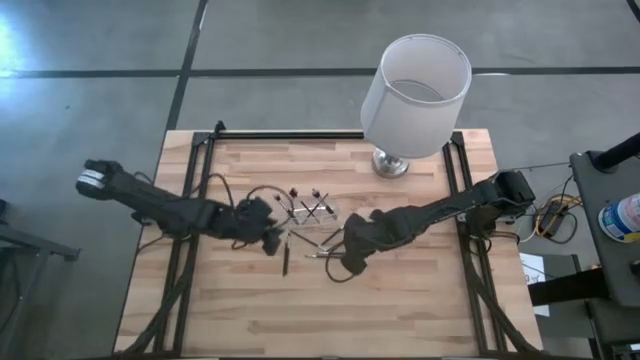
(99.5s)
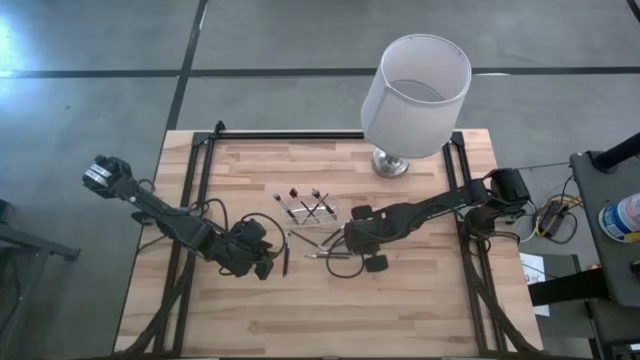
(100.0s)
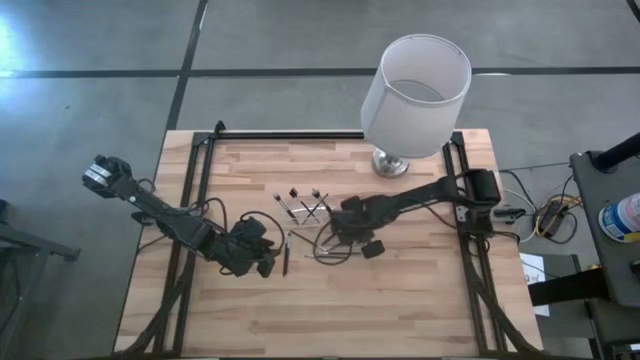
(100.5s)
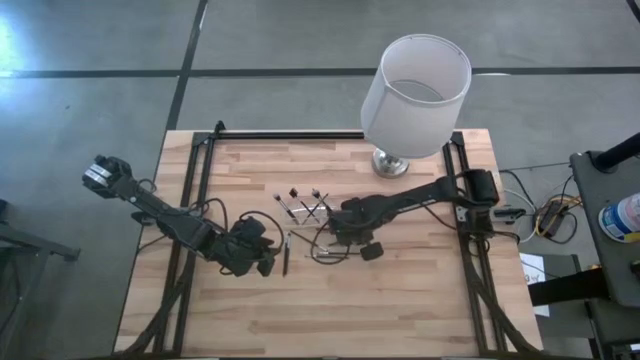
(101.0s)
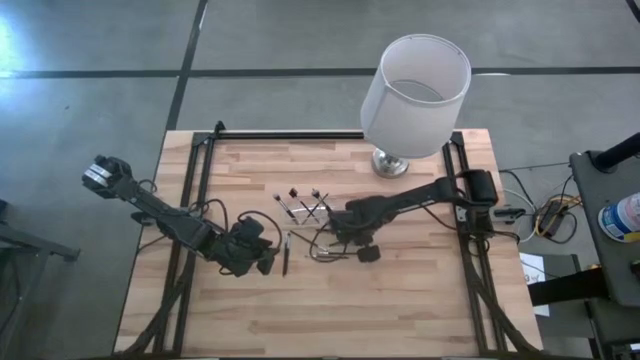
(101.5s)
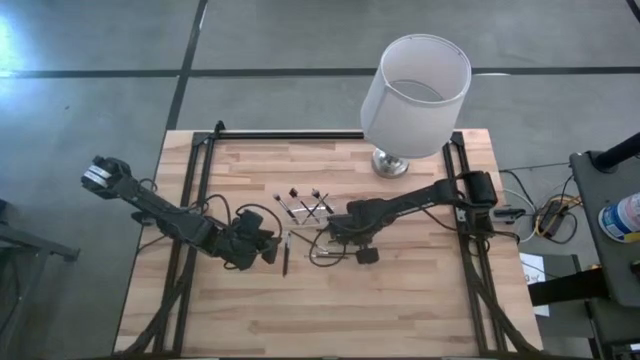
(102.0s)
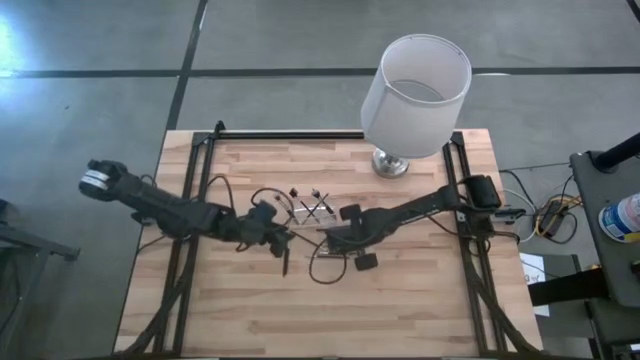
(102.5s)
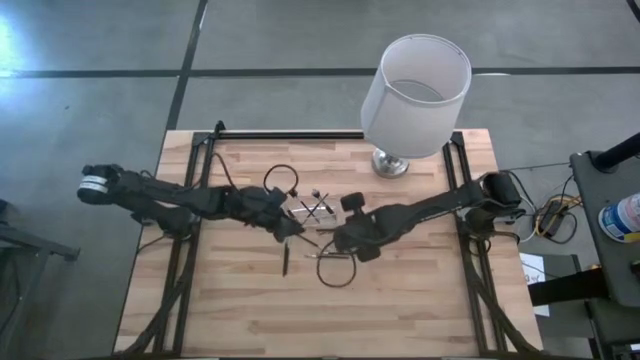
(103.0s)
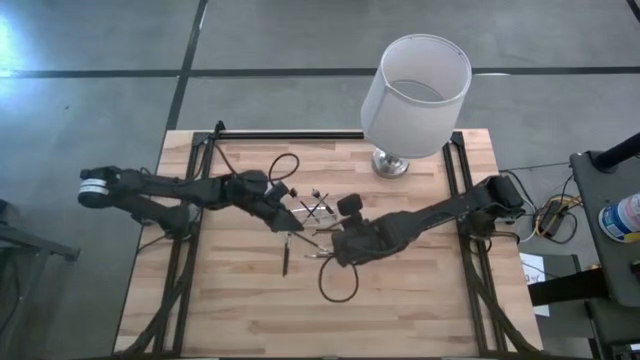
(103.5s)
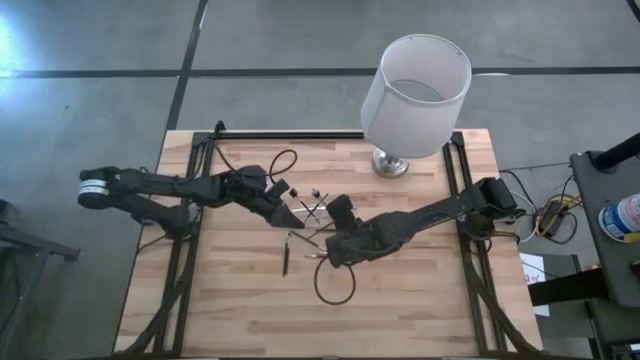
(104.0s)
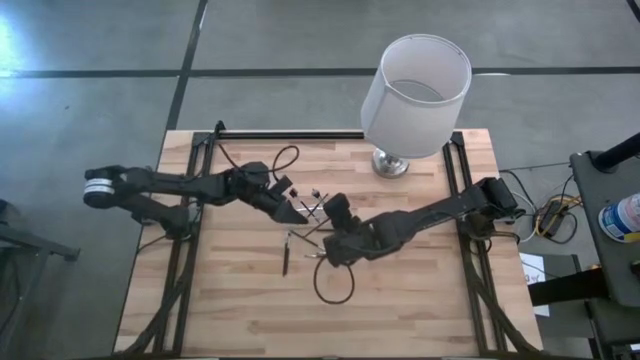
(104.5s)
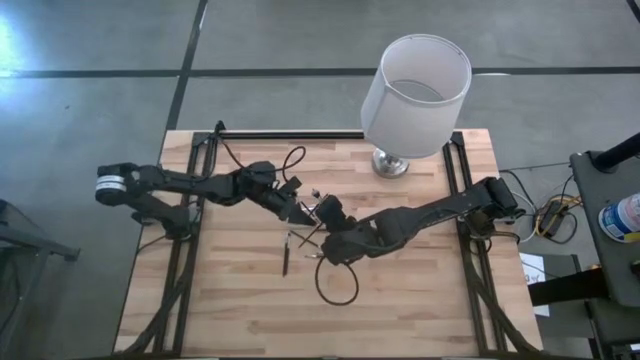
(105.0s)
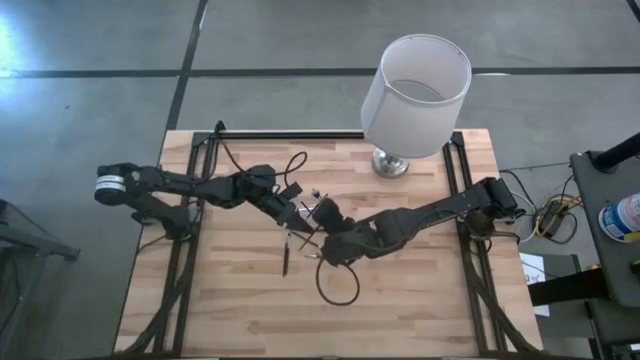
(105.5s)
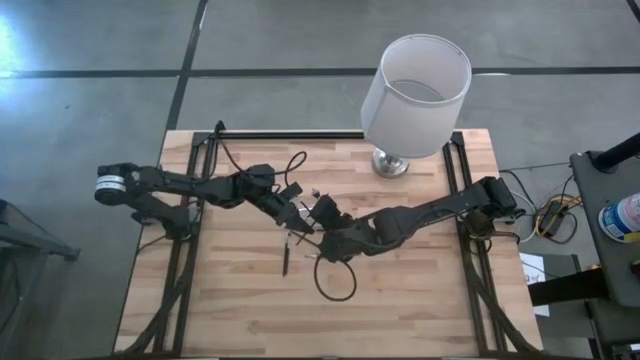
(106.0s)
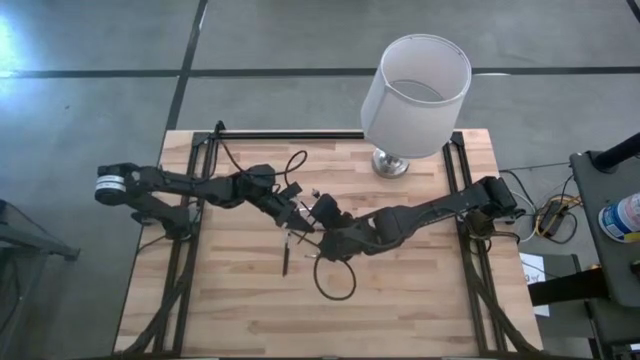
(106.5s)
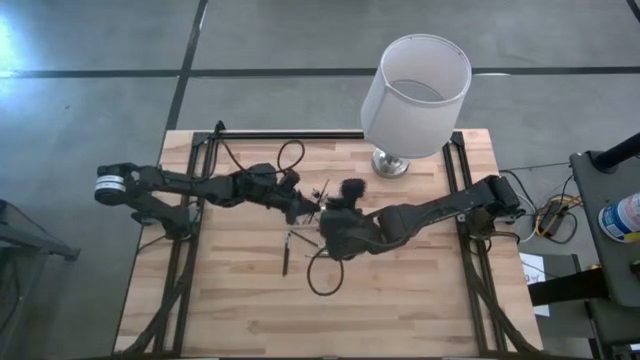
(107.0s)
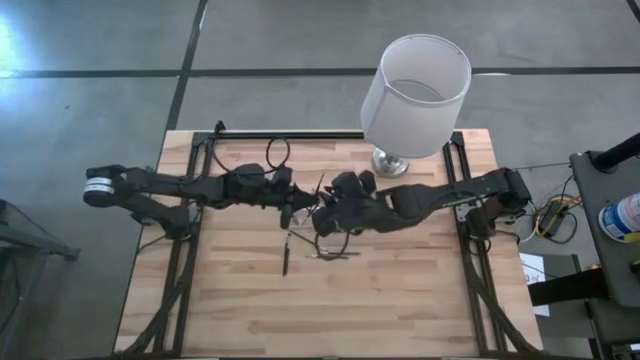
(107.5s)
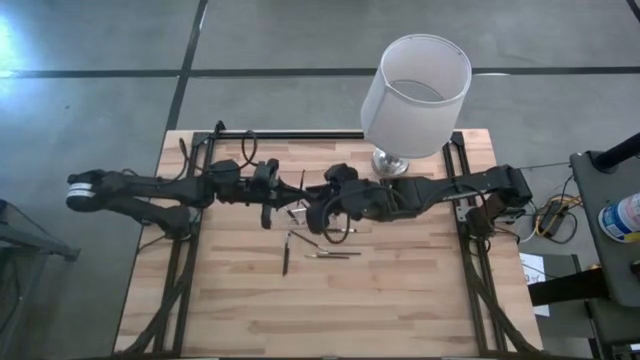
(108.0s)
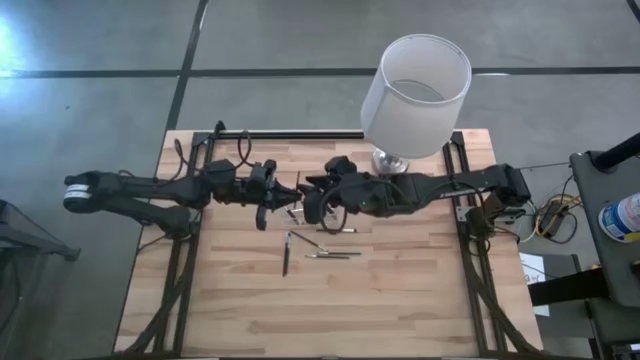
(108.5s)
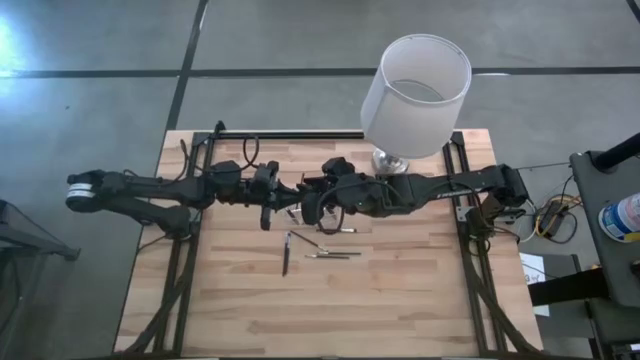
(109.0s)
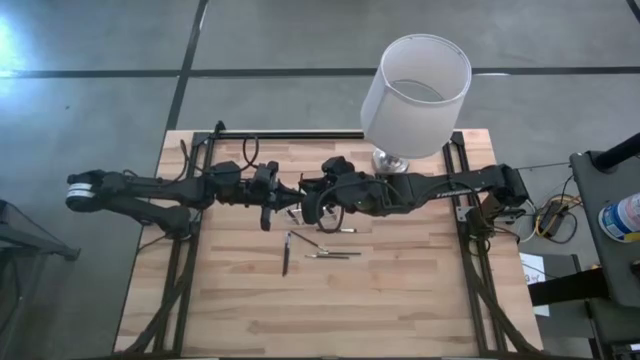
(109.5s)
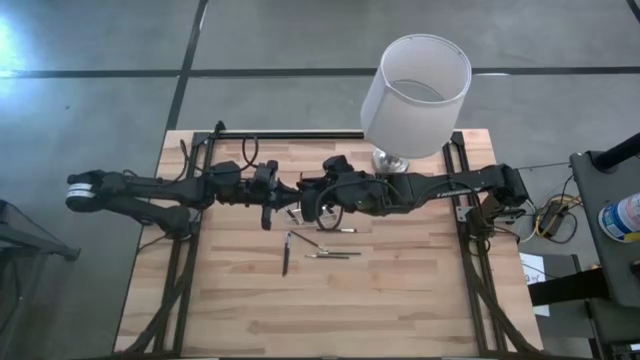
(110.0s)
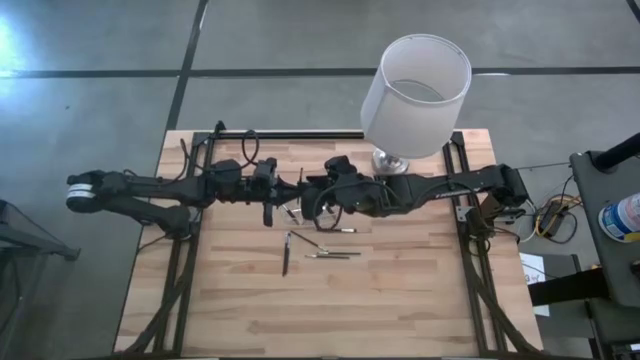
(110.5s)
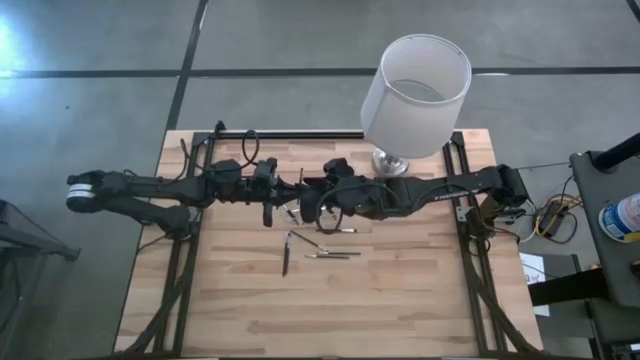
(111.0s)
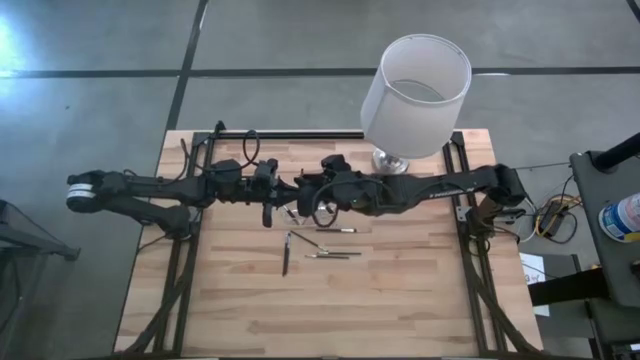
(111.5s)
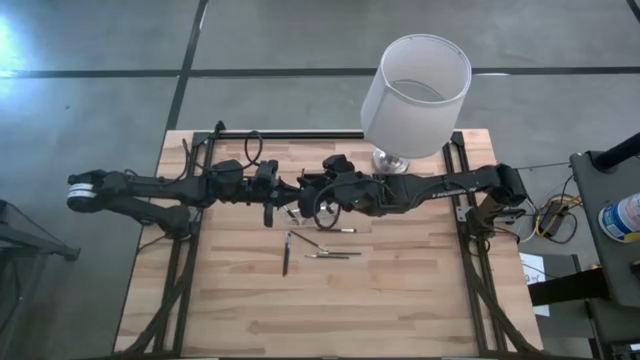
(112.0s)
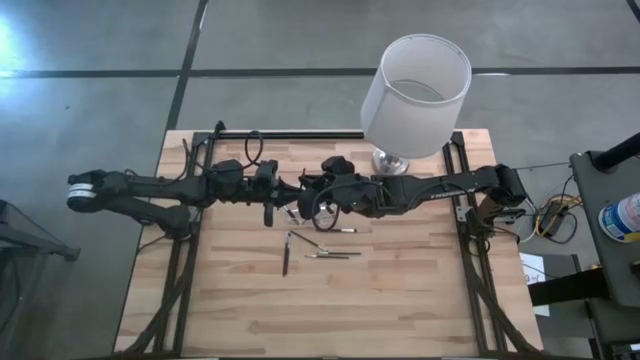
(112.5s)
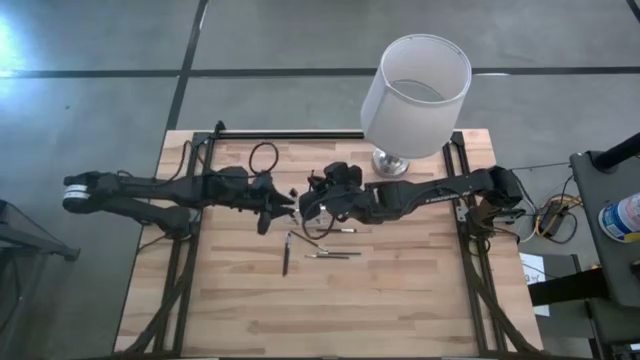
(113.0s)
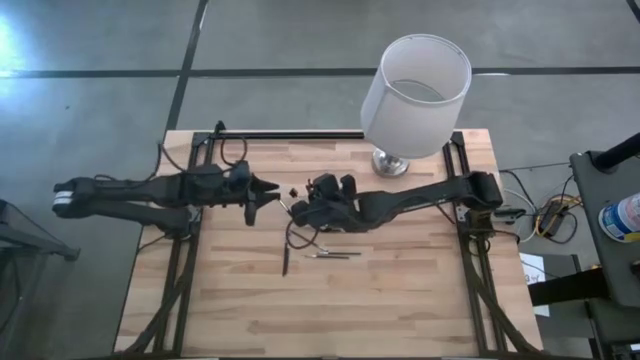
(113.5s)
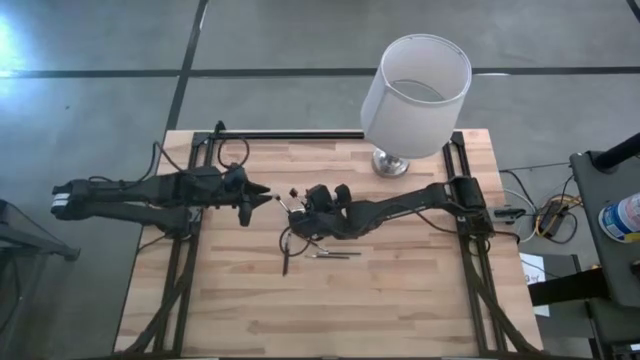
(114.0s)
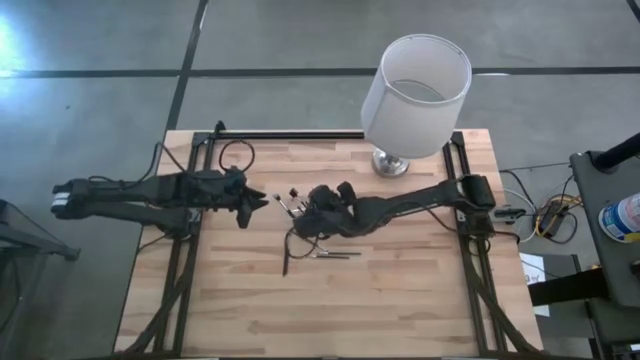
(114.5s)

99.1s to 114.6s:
Task: Put items in baskets/containers
Put the eyeshadow brush into the transparent organizer

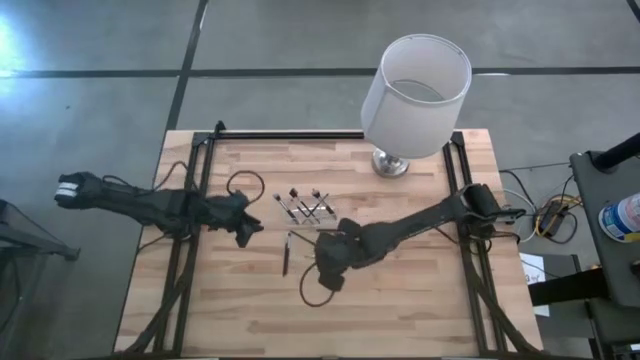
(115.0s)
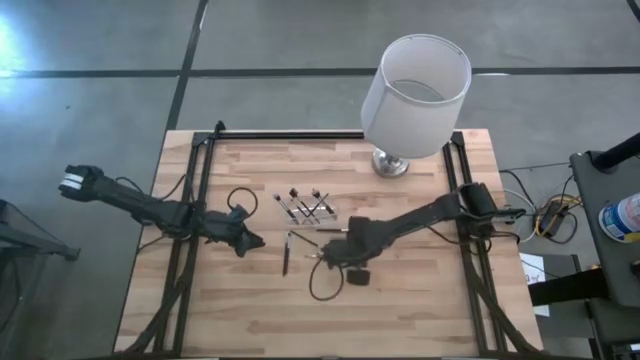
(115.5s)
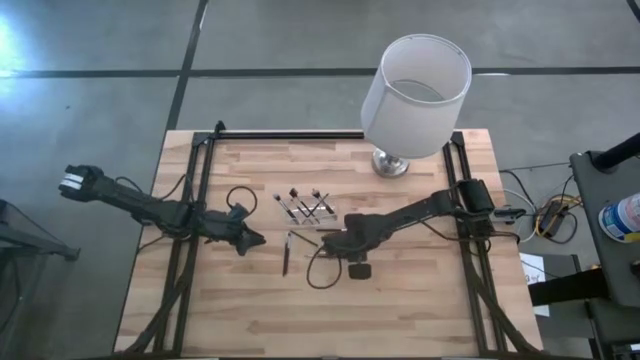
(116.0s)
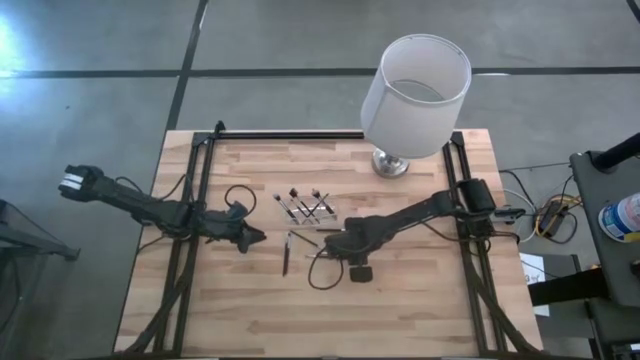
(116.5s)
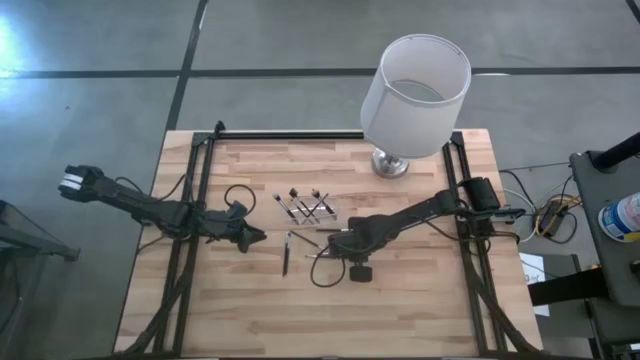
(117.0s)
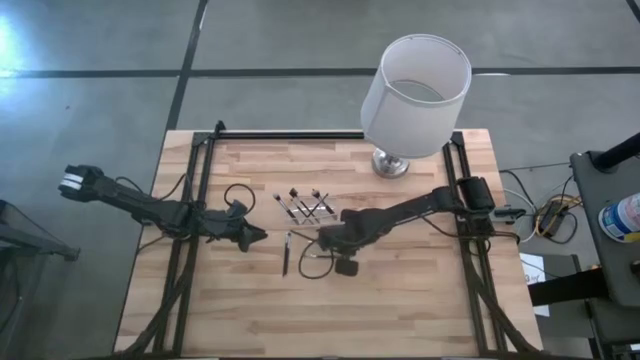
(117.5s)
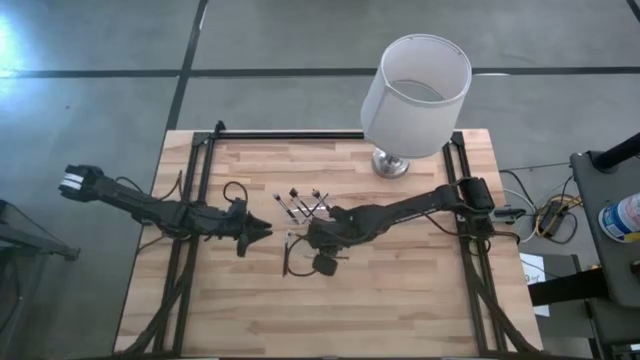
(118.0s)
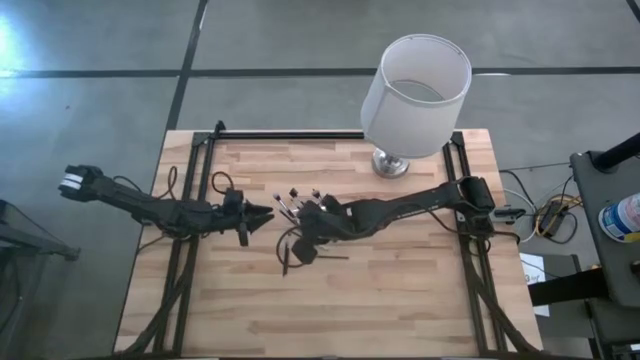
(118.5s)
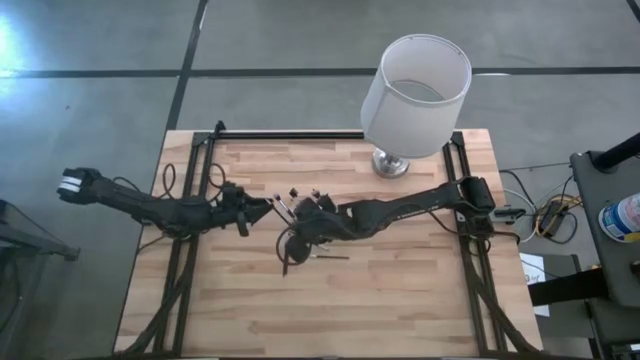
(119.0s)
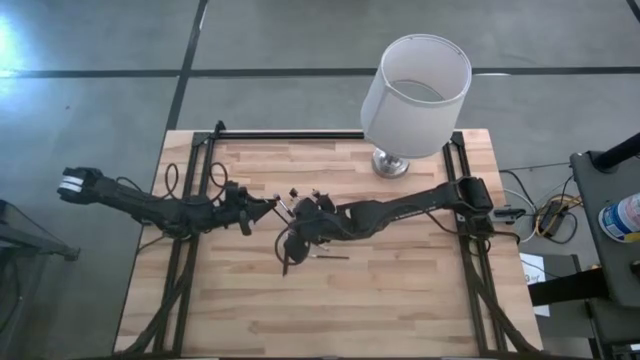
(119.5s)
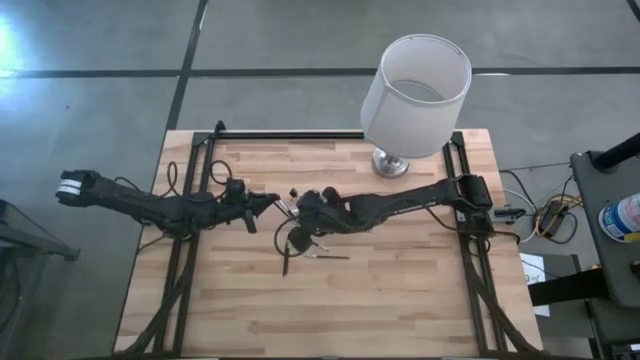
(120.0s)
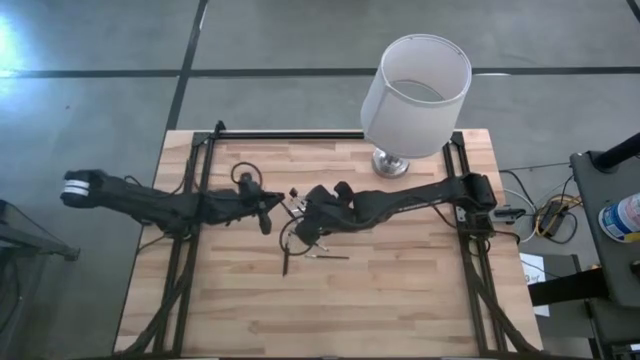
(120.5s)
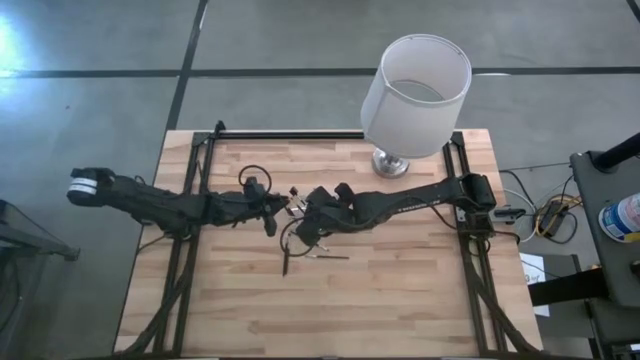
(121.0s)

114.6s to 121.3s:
Put the eyeshadow brush into the transparent organizer
